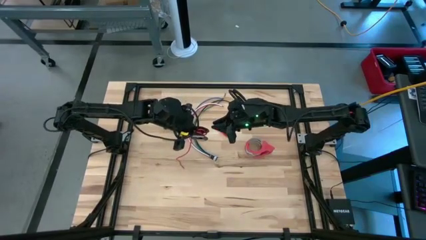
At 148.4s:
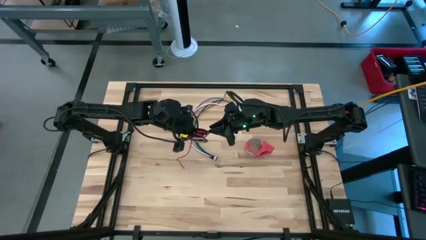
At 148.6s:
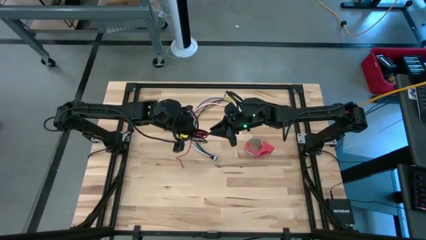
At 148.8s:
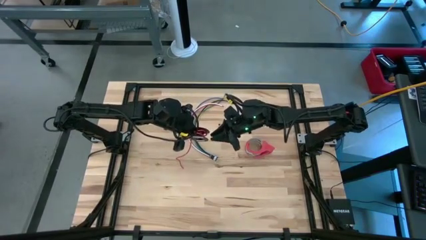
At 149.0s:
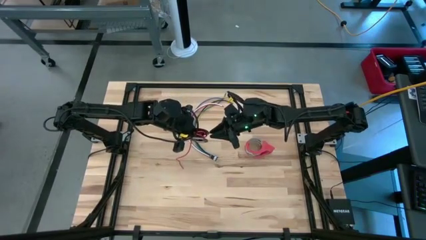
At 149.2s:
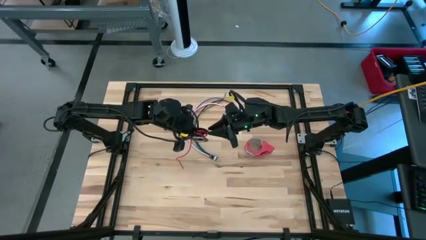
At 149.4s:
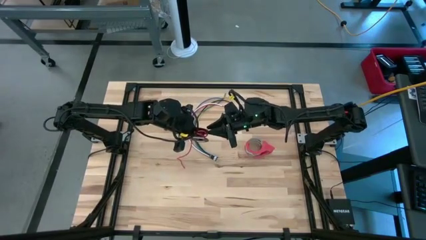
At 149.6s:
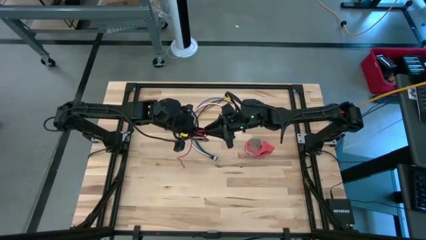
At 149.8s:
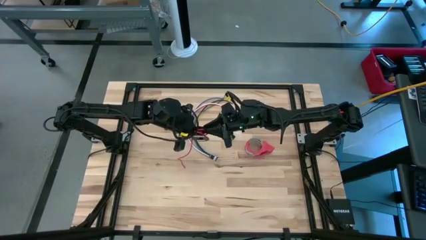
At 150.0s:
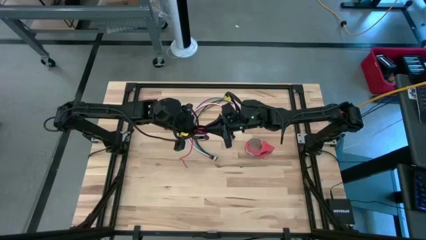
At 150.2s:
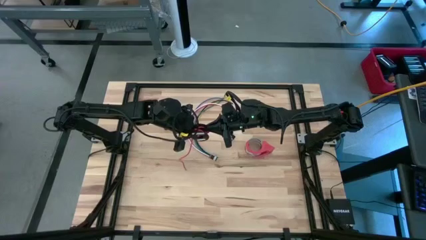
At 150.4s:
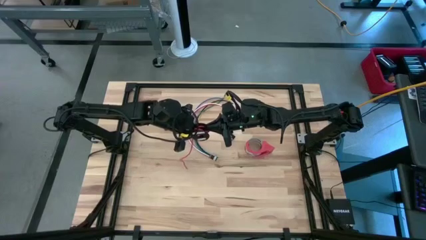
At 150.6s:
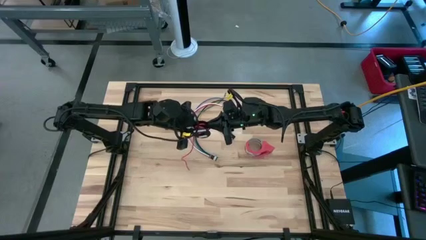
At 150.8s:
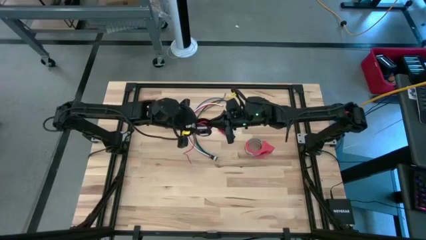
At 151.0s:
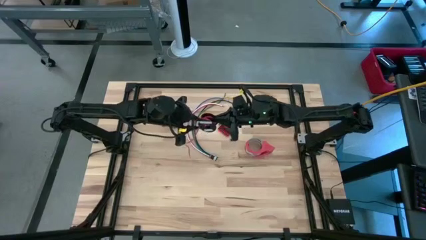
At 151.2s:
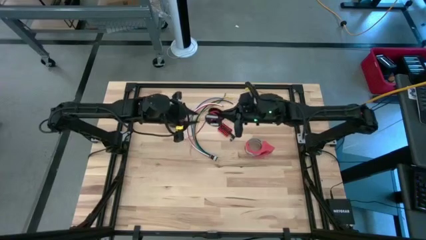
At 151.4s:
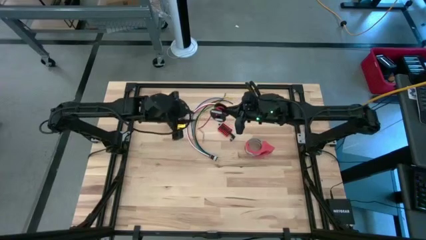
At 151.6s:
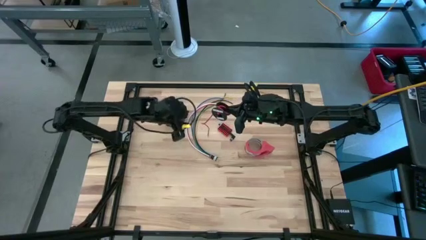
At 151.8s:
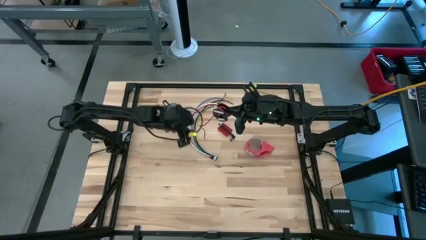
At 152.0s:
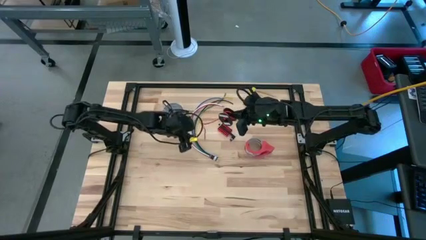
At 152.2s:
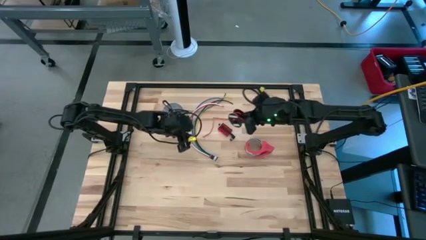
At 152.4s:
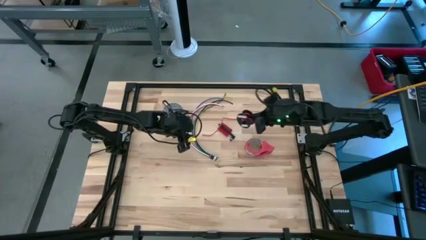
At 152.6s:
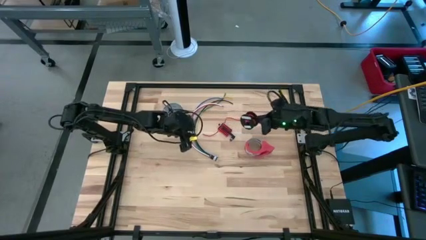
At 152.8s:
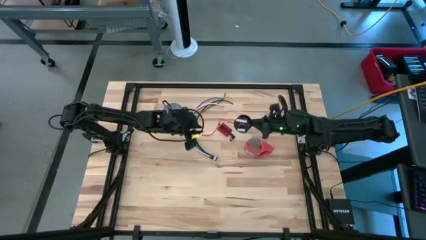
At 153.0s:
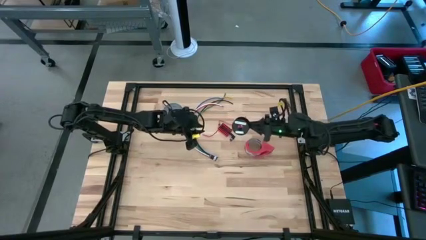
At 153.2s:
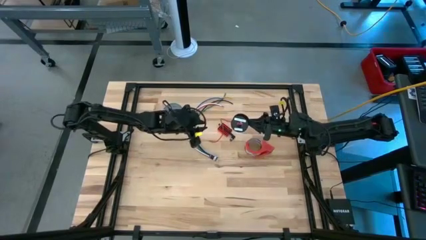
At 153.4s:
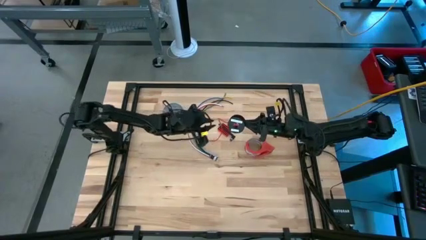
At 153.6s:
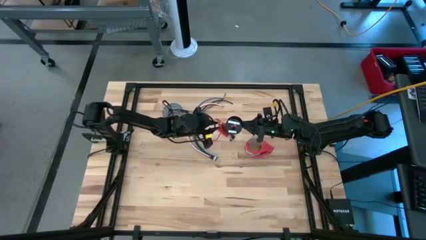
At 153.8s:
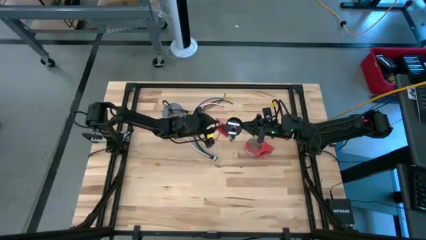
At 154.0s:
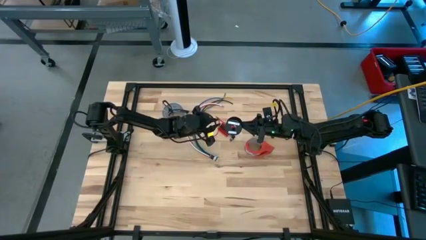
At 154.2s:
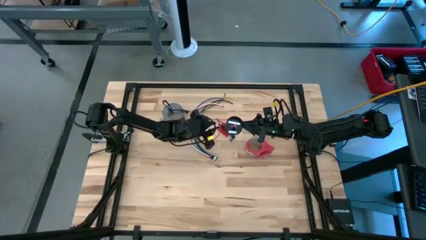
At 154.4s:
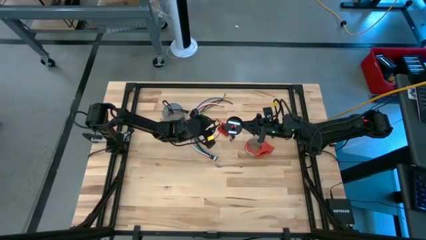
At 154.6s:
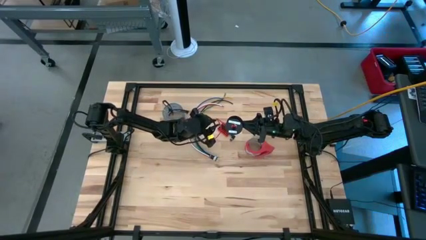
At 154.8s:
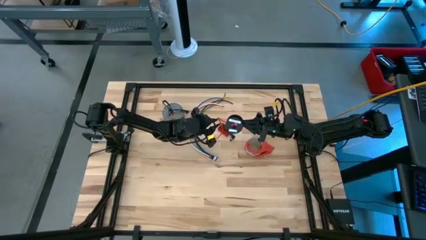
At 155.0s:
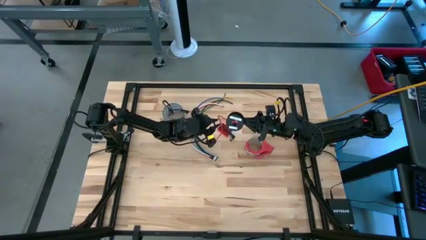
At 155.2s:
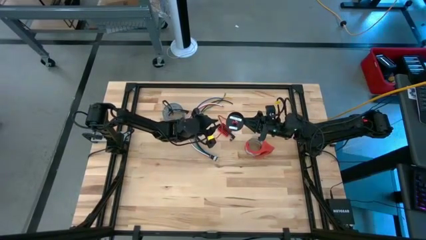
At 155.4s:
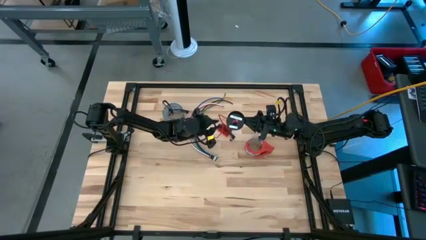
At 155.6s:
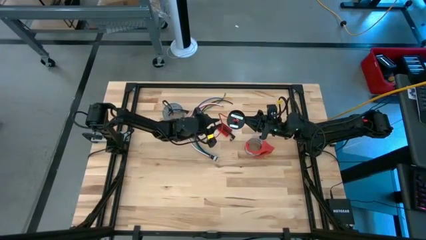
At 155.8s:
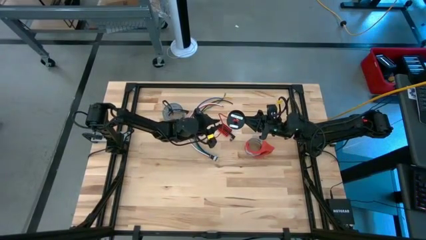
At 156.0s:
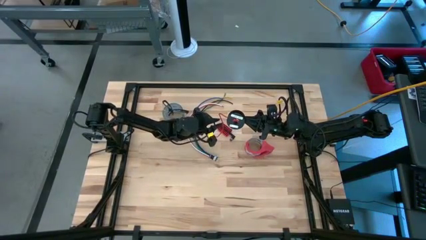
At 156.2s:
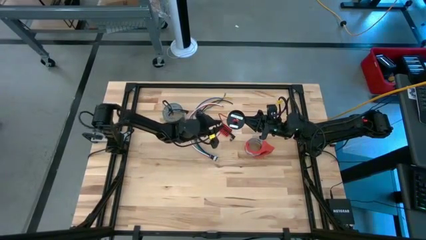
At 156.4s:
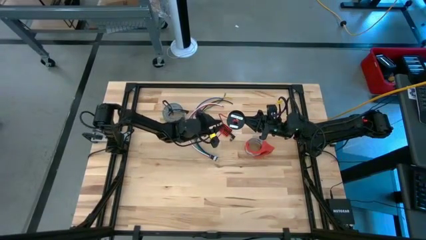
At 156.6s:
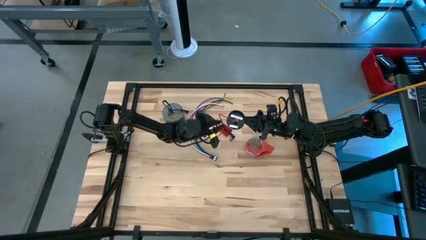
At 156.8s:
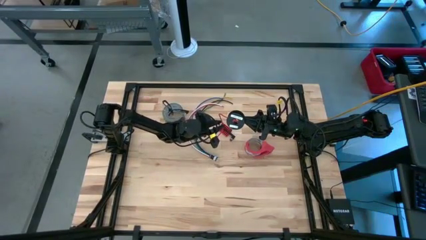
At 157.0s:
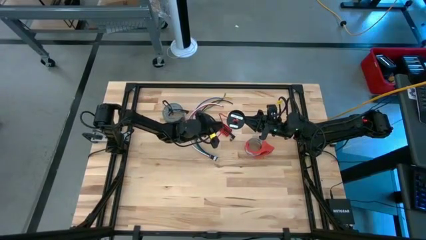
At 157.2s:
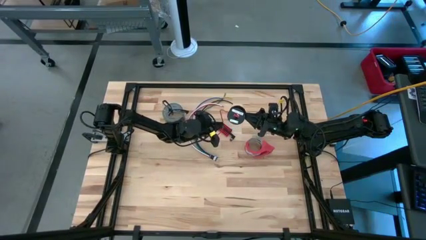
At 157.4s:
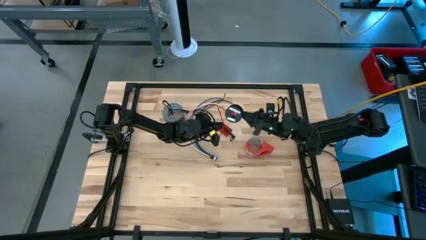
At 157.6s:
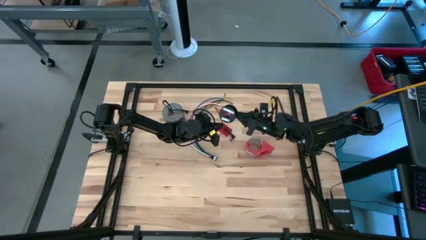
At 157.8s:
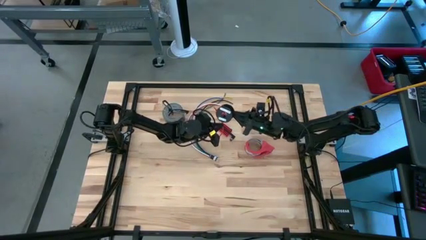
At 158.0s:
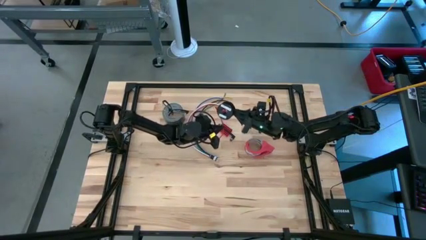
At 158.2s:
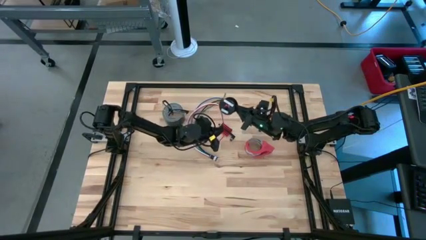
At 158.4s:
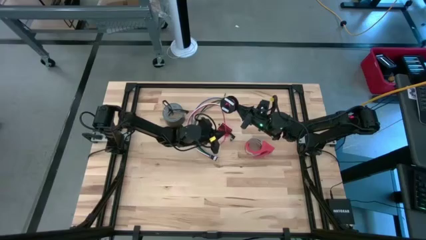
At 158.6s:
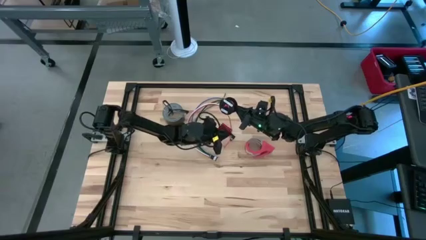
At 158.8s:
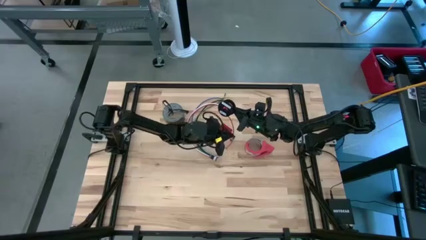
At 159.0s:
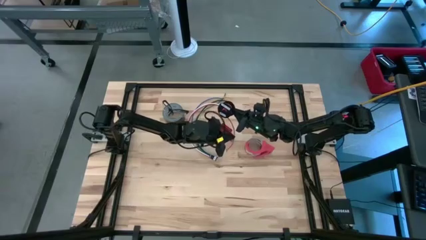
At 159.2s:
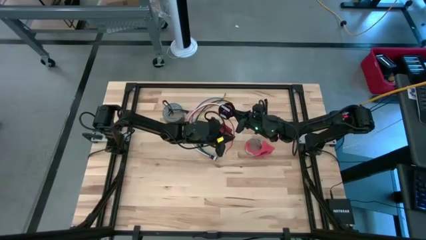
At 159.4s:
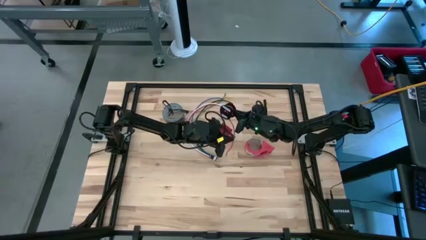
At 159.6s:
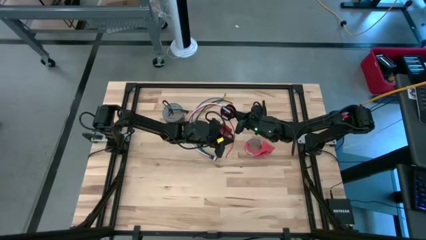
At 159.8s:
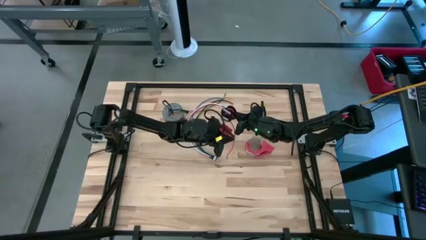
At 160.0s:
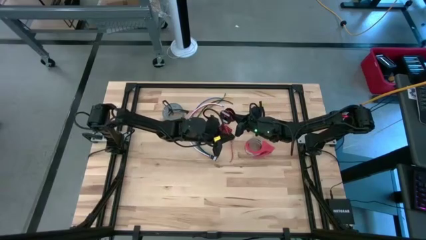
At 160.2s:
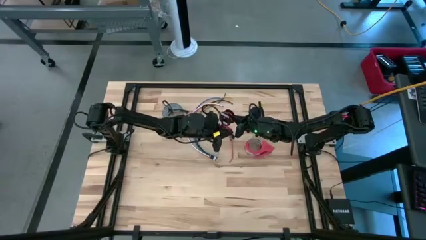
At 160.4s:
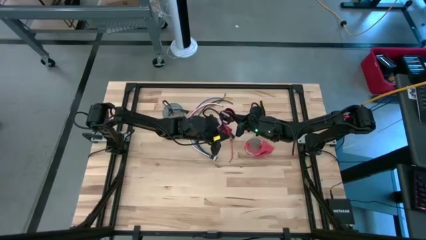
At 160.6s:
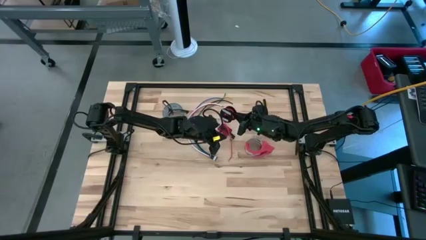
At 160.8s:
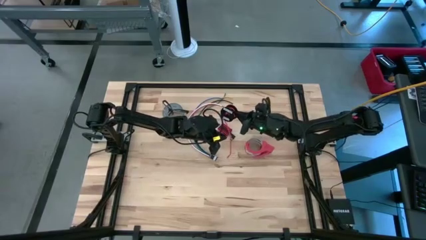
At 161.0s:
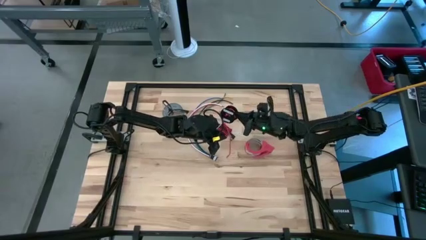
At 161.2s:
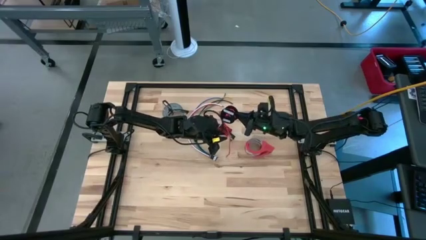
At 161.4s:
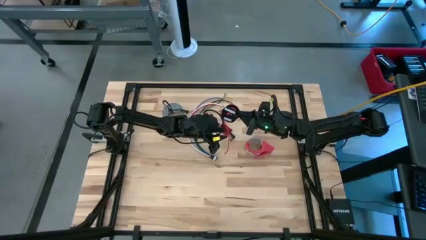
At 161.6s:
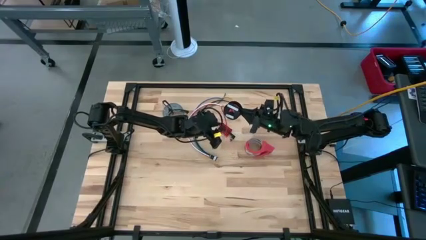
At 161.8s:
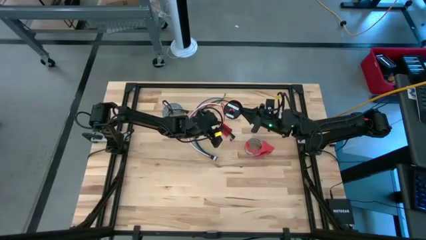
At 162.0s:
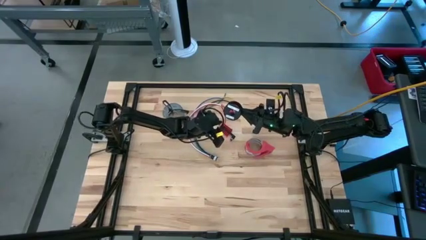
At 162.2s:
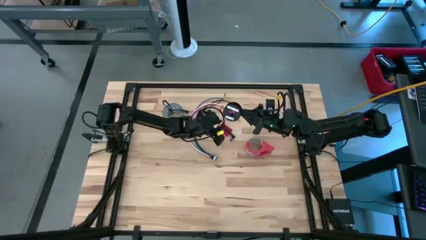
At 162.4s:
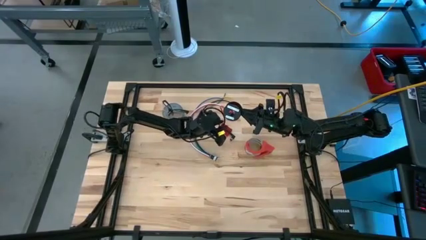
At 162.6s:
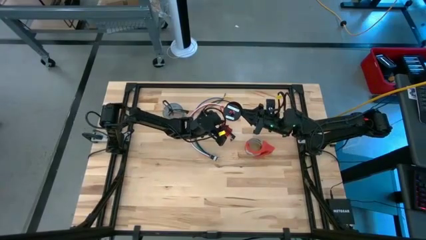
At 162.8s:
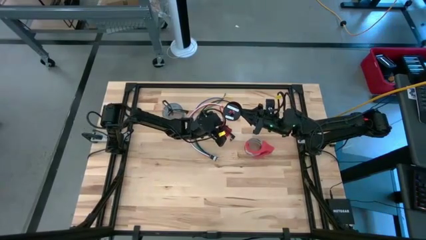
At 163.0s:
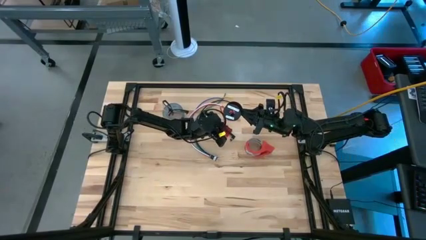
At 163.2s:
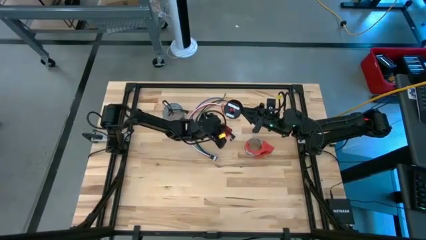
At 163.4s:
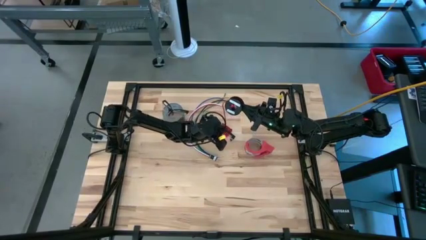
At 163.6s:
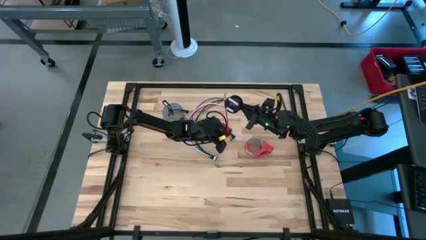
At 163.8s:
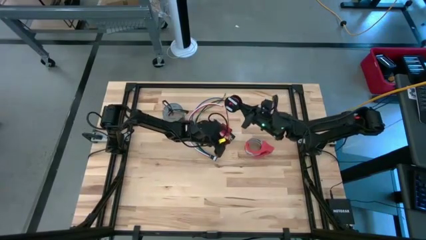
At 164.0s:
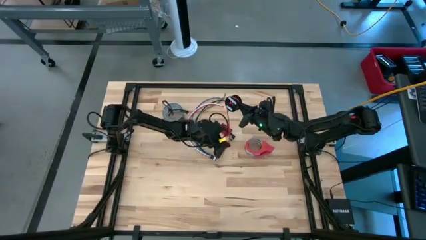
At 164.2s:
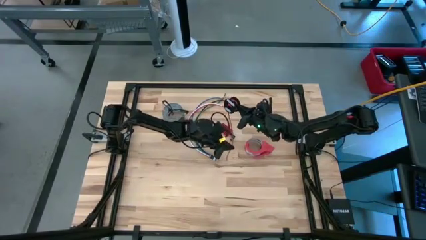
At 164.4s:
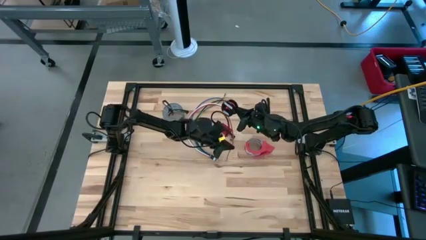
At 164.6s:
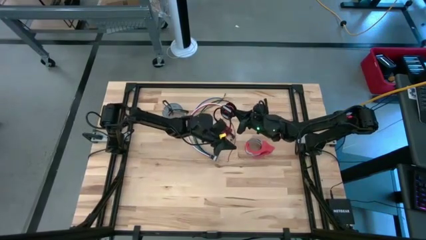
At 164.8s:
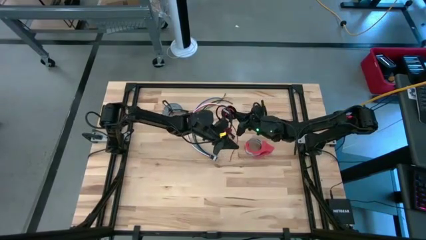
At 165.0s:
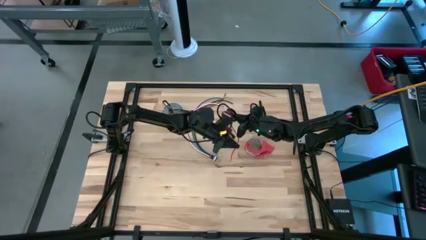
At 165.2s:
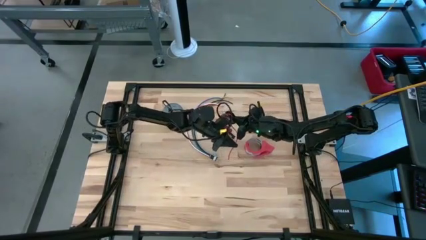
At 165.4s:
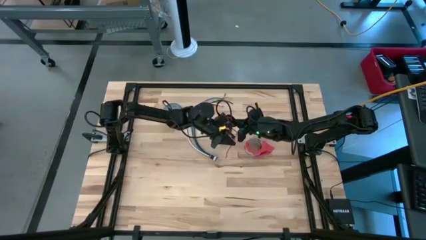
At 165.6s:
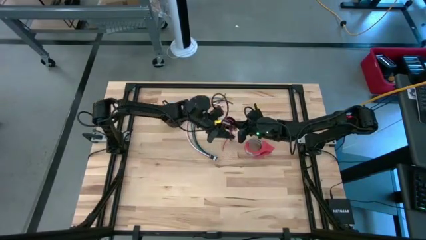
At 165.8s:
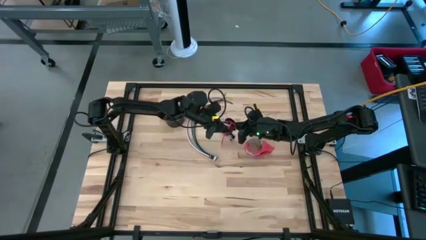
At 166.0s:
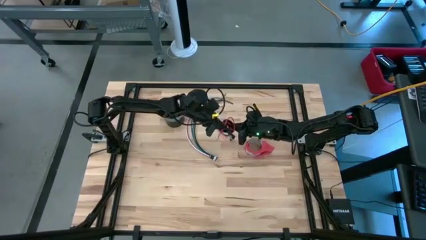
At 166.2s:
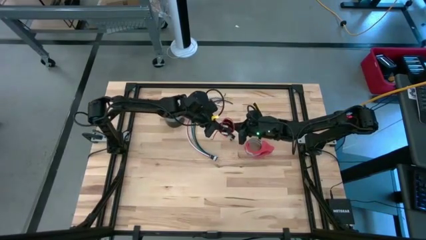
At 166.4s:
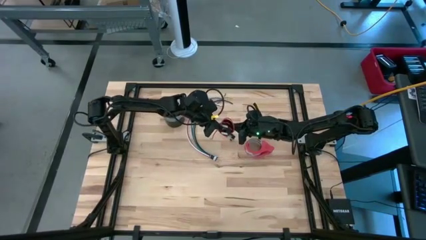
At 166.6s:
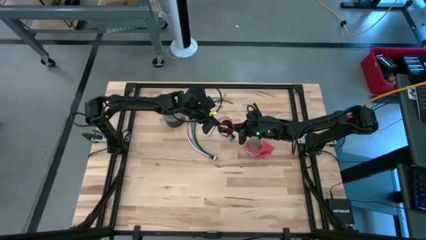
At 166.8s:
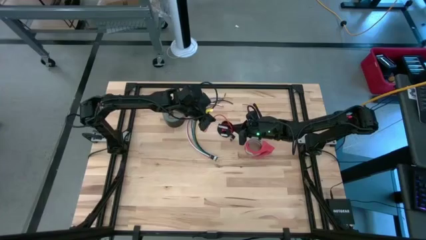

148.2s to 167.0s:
Task: Coil cords
Coil the red wire onto the spool
